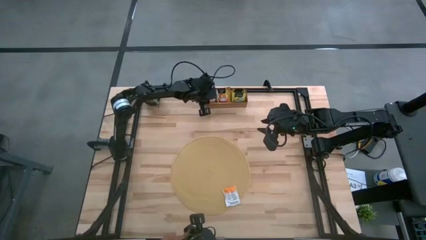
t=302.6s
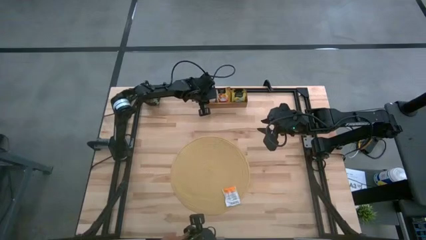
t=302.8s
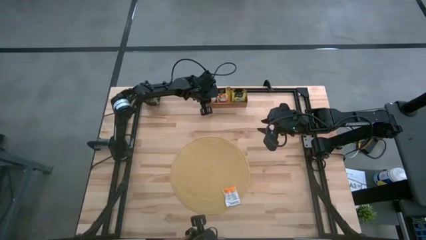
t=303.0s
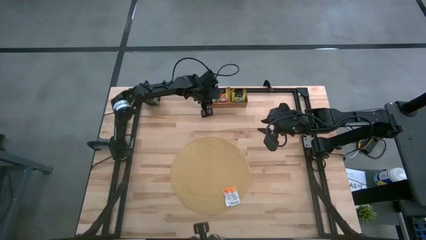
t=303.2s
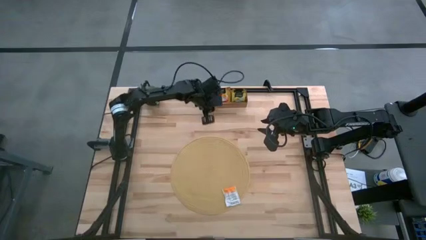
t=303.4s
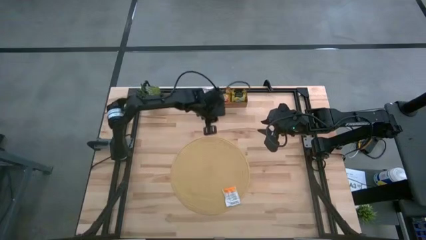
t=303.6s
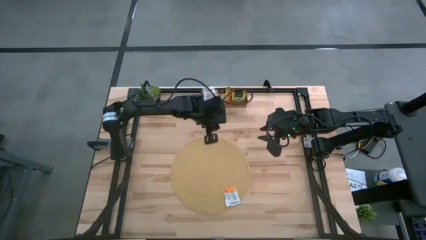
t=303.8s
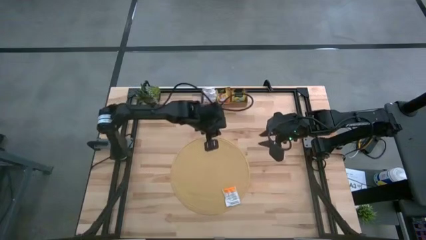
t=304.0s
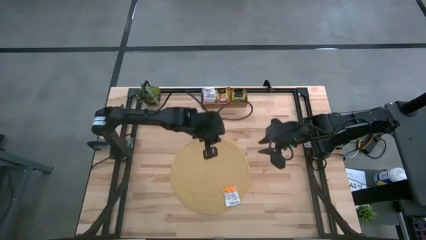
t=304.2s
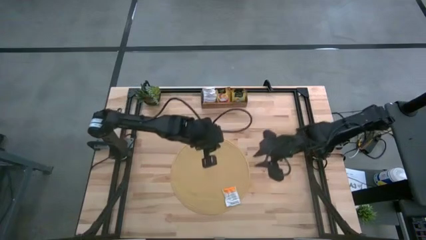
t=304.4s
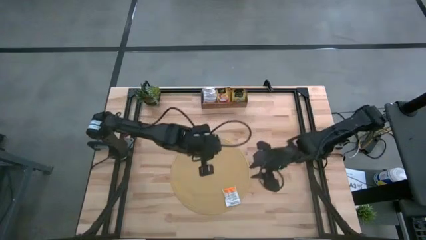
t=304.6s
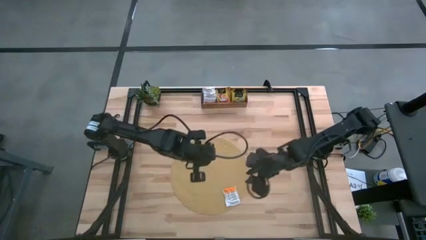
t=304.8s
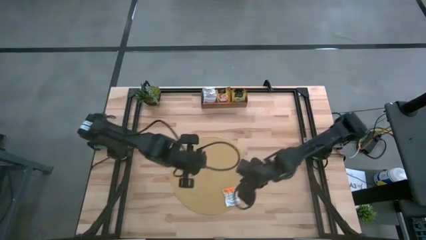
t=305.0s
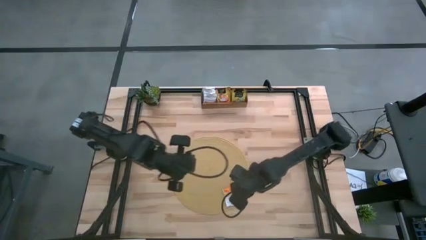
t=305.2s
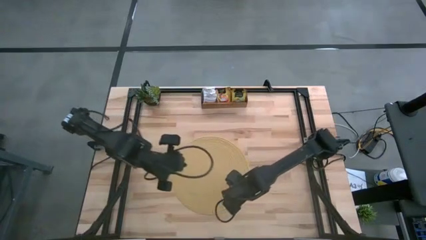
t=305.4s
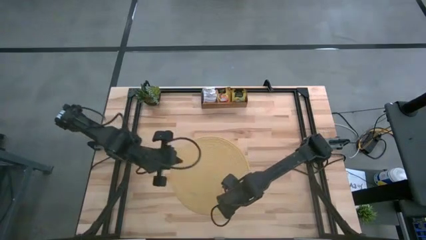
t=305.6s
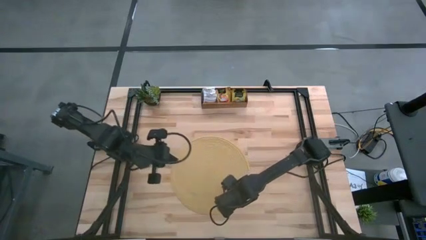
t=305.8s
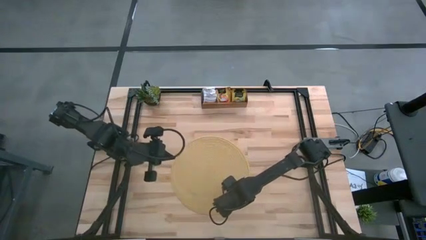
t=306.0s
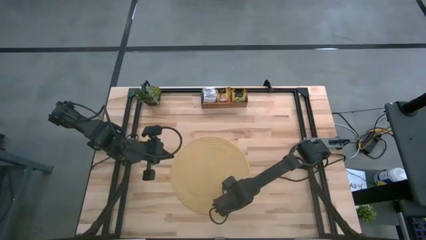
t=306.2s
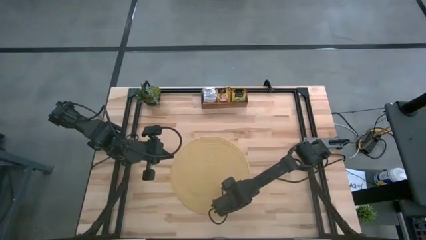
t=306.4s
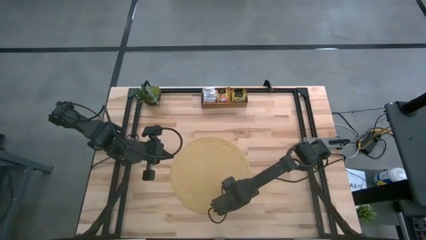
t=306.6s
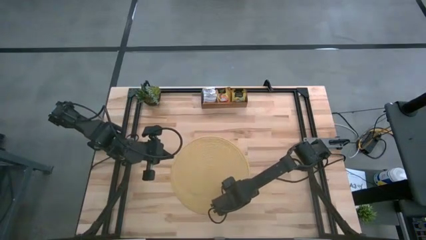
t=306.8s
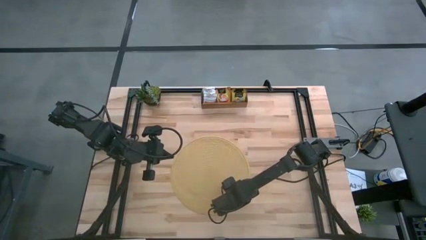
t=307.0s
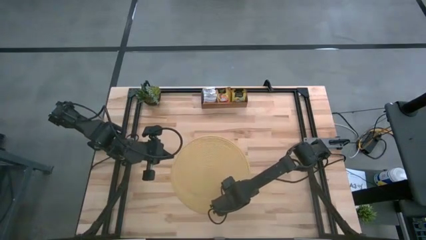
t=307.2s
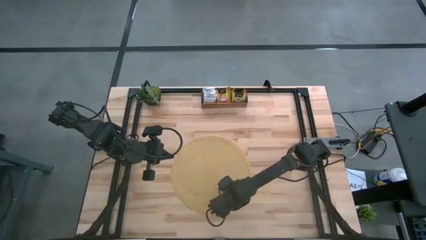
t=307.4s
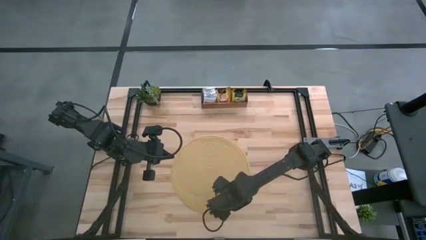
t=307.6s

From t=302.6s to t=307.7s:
Task: Pick & Place Tea
Put the orange tea bag into the left section of the wooden organizer

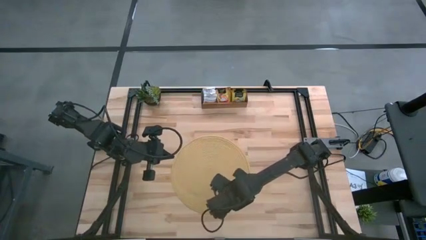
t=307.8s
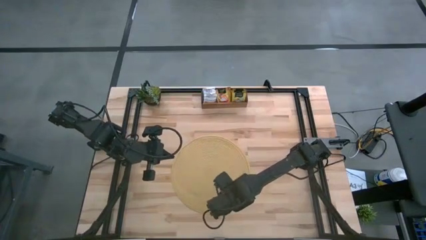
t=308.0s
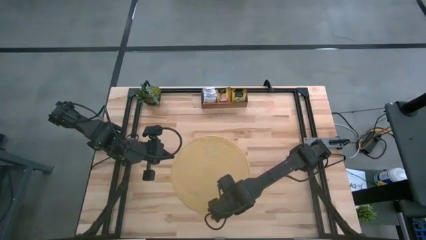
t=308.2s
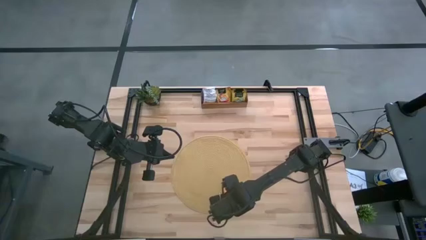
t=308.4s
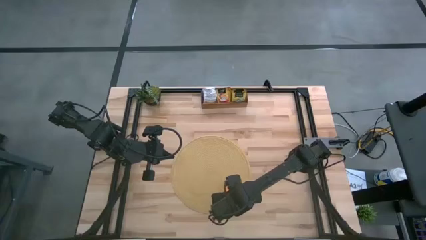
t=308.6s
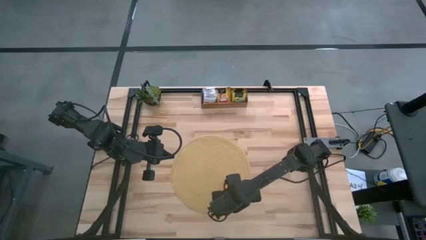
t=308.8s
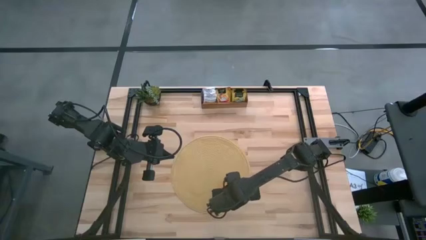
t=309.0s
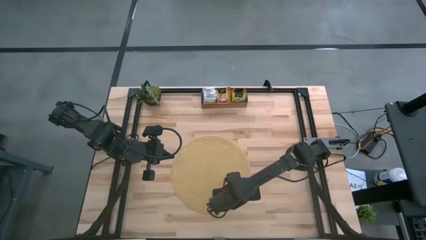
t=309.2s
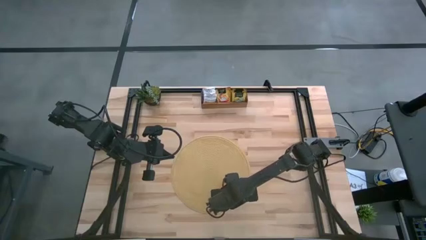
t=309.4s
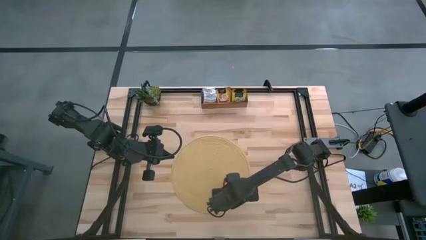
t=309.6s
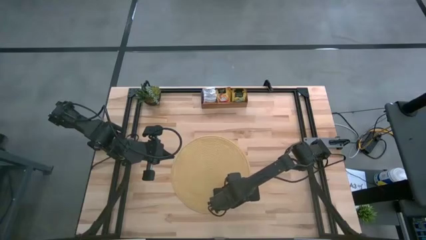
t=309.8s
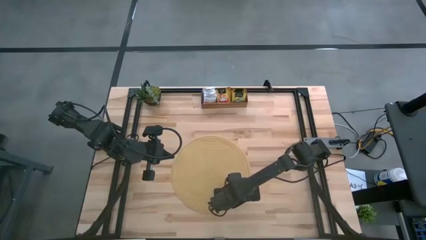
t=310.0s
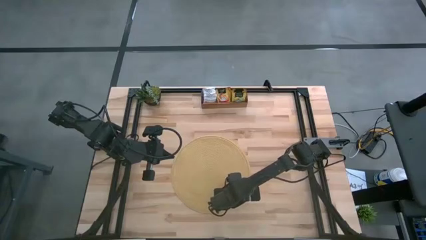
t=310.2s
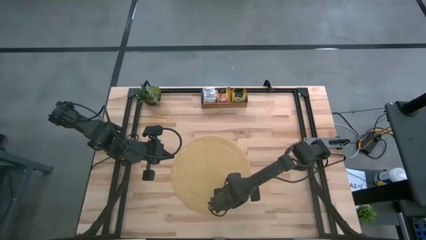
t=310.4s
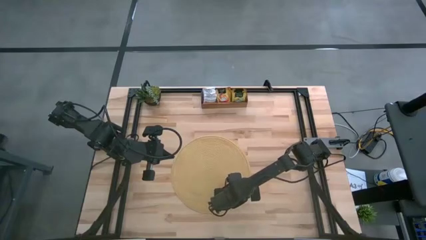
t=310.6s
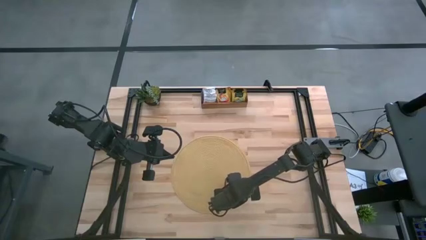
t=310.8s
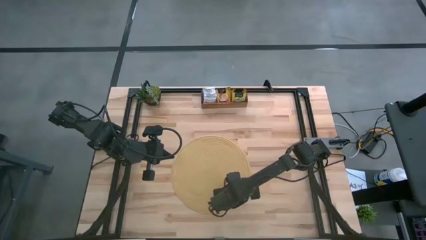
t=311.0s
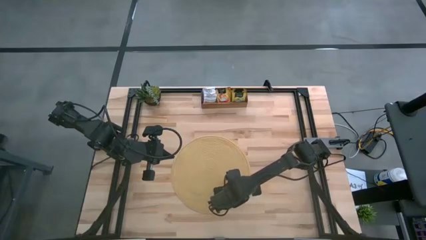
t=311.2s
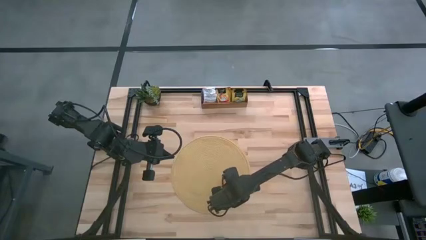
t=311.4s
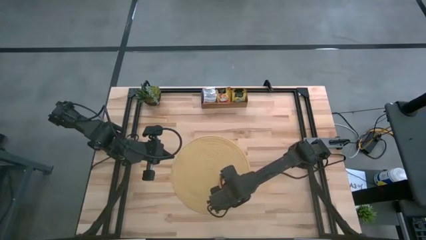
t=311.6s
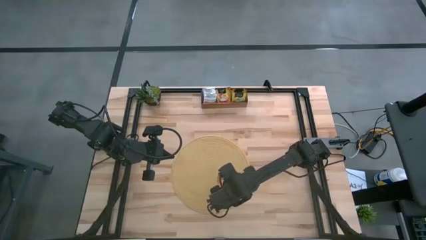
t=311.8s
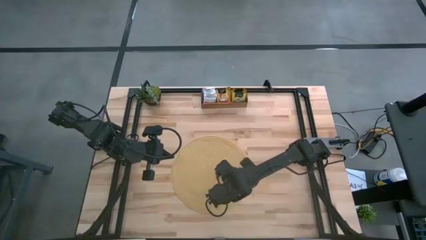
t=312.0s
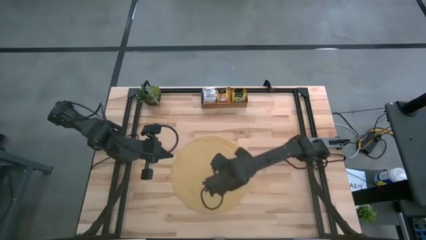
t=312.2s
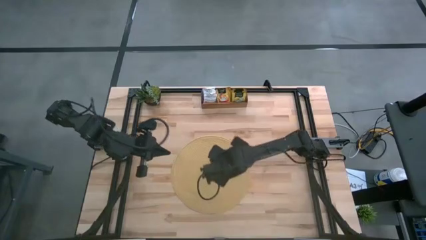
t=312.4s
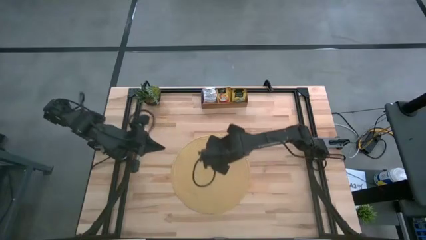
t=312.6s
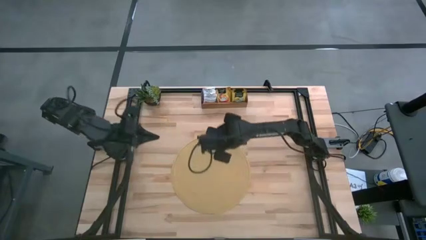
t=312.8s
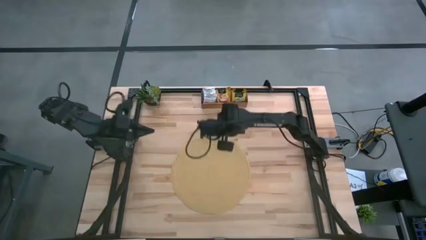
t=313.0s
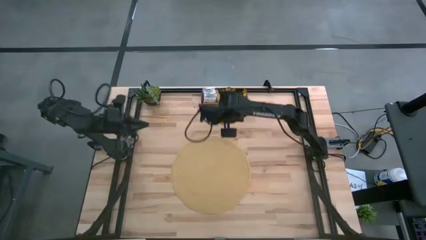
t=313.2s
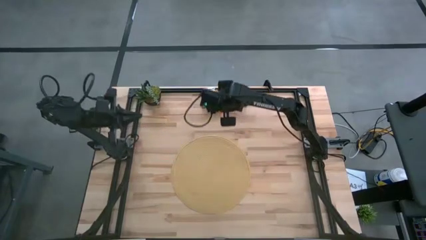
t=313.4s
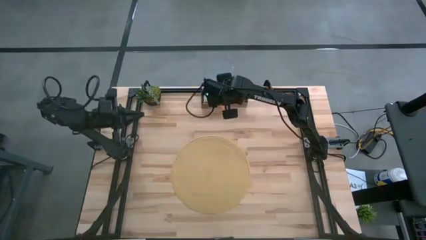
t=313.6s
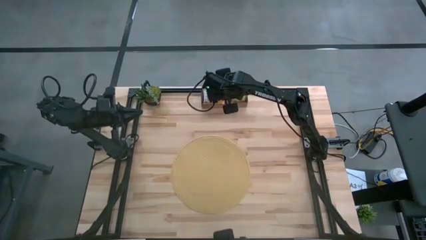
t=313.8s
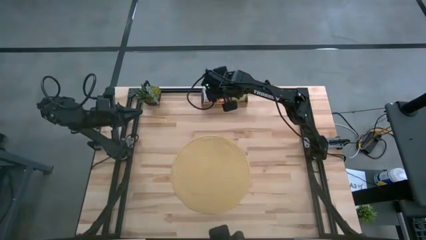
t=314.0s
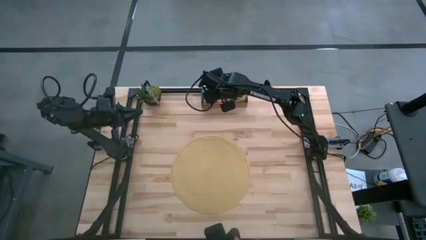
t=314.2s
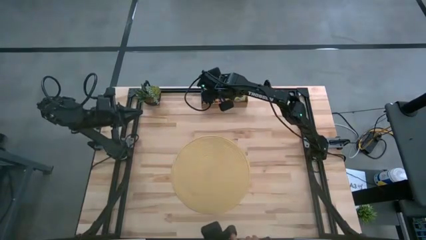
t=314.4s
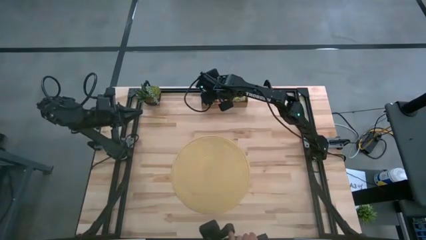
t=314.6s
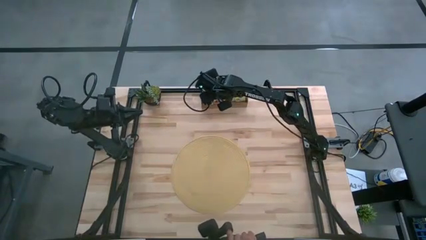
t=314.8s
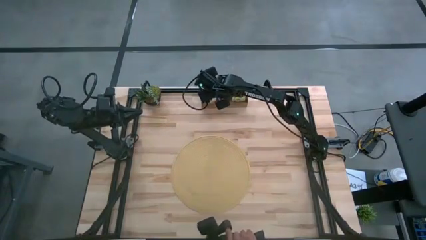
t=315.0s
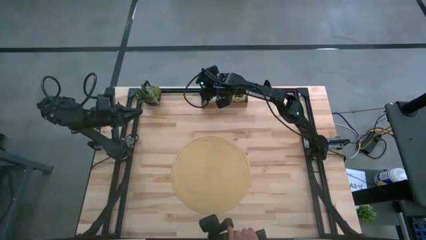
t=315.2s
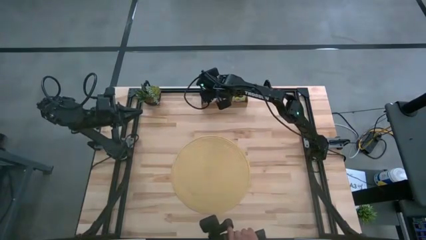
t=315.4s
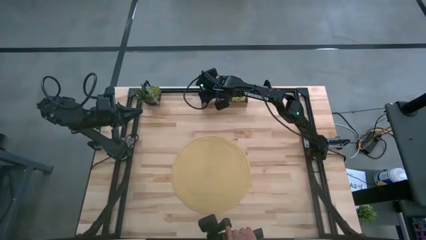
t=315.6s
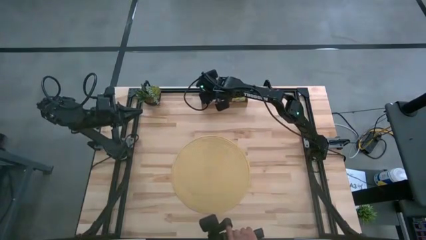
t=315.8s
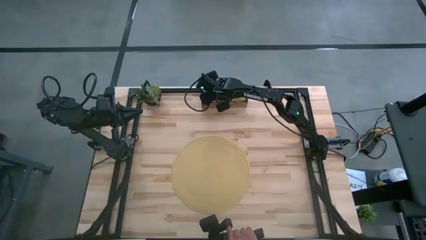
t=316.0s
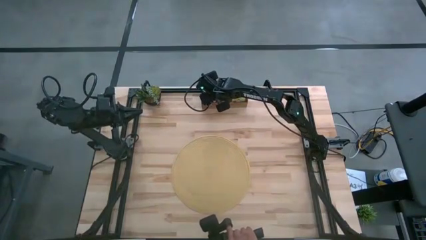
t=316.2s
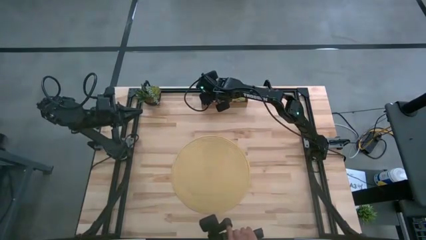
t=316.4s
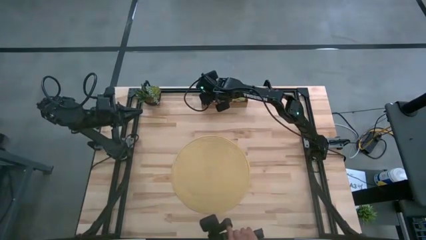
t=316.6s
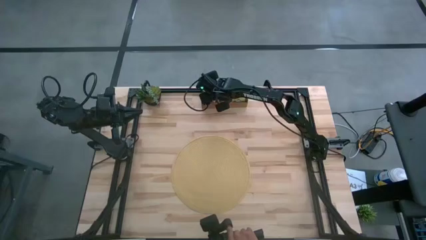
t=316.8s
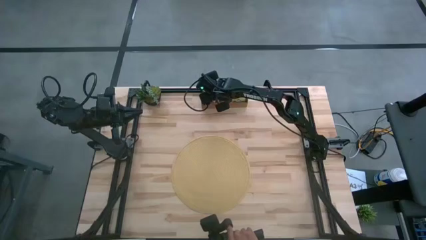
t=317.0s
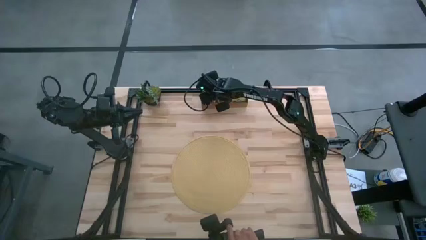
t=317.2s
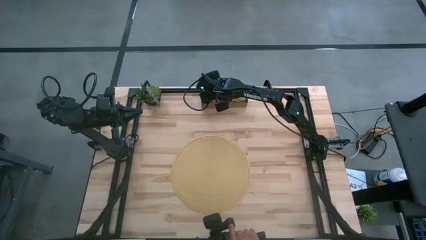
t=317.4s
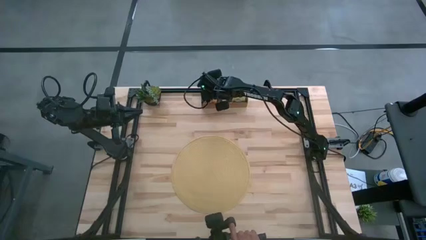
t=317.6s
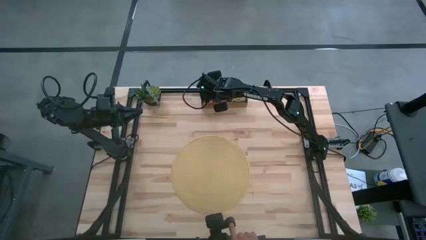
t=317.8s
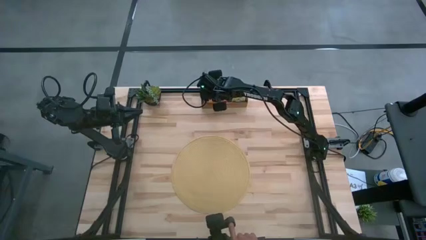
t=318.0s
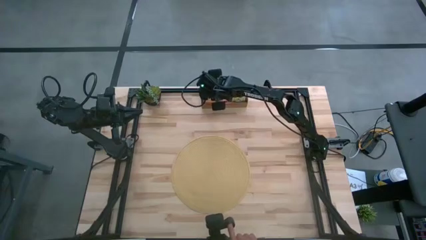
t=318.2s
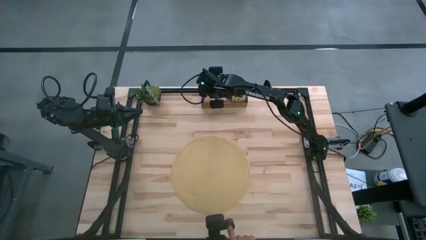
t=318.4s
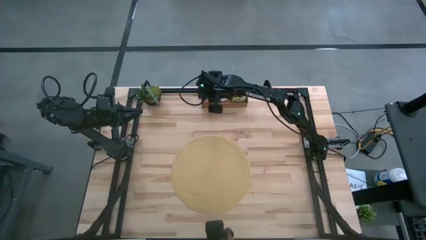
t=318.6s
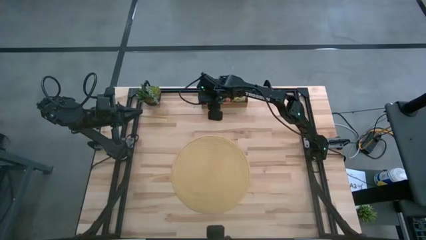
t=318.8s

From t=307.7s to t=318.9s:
Put the orange tea bag into the left section of the wooden organizer
